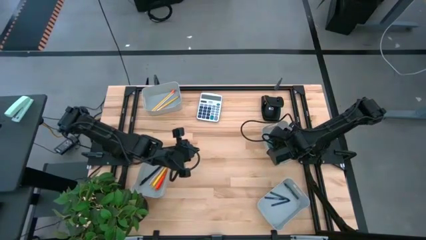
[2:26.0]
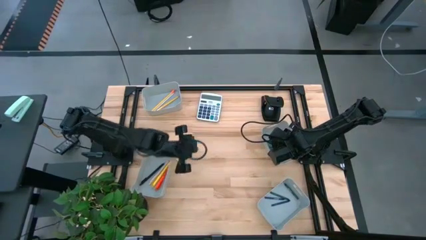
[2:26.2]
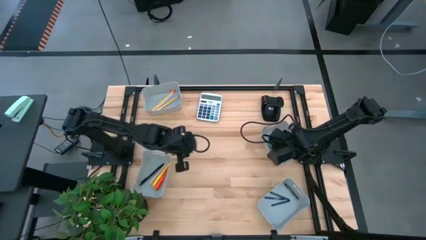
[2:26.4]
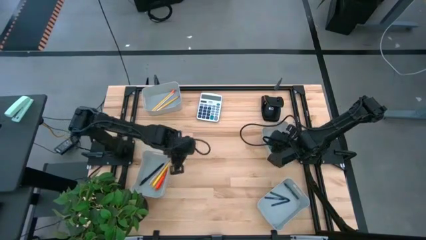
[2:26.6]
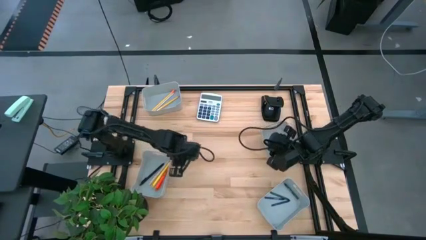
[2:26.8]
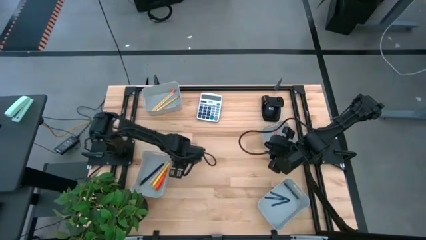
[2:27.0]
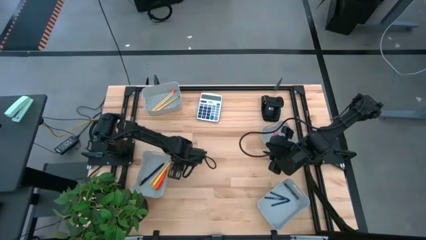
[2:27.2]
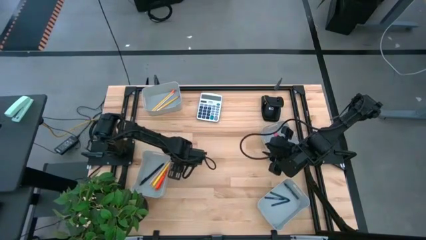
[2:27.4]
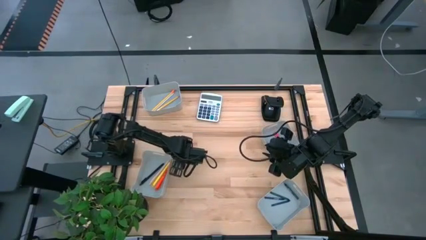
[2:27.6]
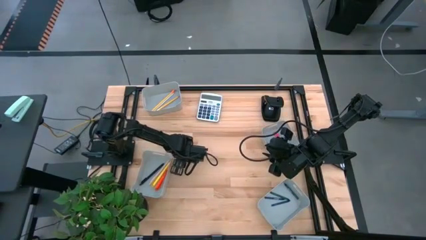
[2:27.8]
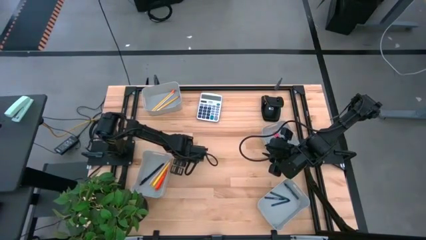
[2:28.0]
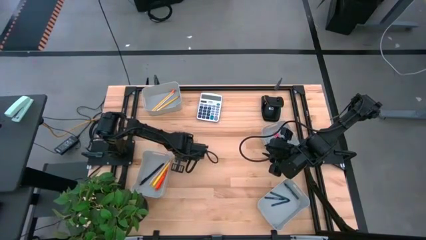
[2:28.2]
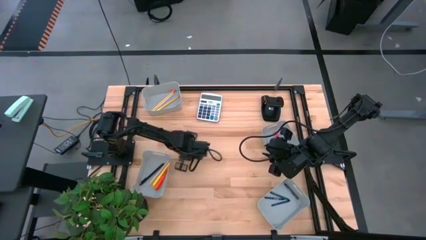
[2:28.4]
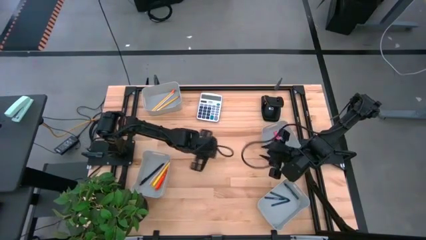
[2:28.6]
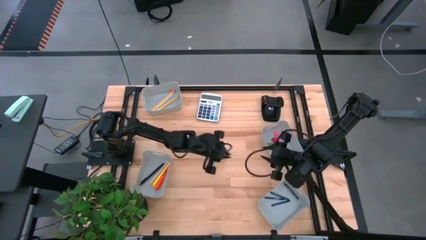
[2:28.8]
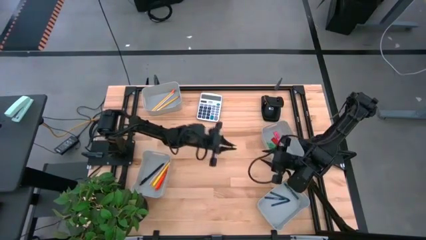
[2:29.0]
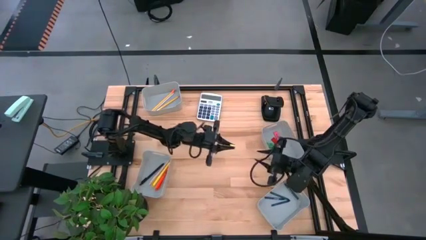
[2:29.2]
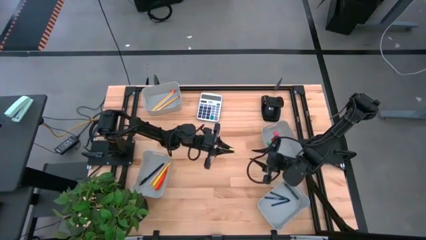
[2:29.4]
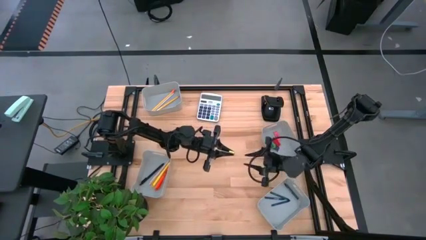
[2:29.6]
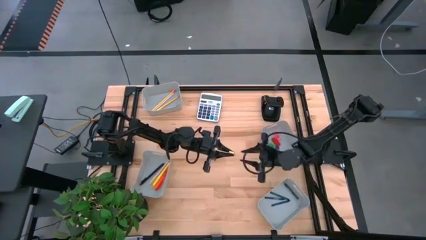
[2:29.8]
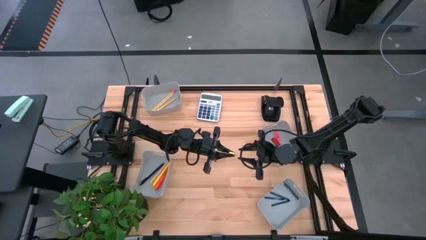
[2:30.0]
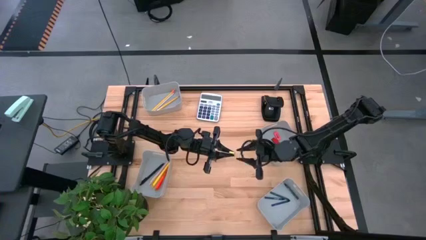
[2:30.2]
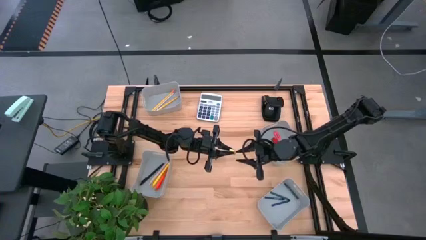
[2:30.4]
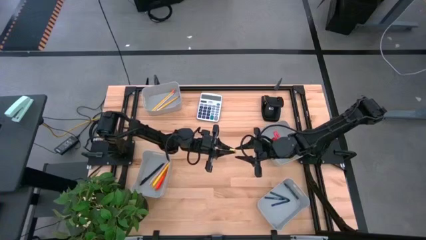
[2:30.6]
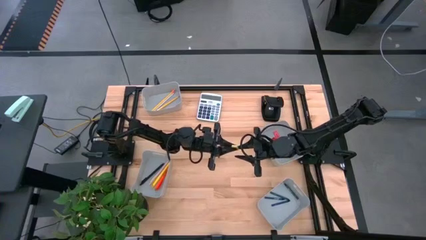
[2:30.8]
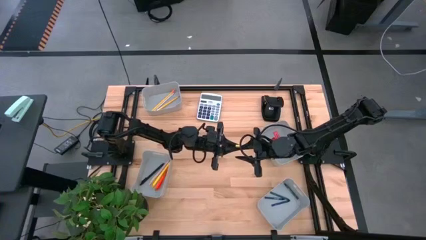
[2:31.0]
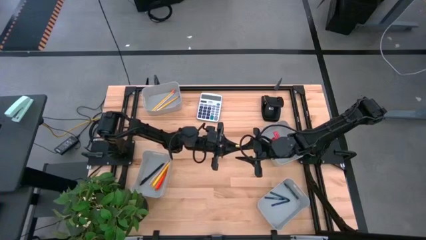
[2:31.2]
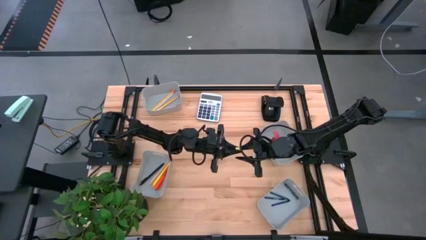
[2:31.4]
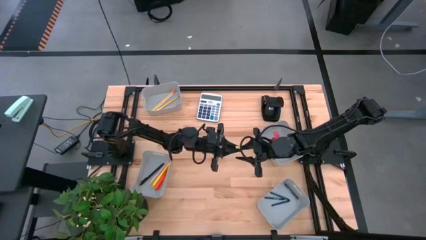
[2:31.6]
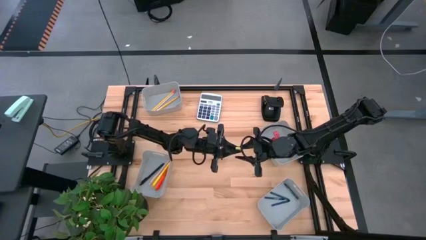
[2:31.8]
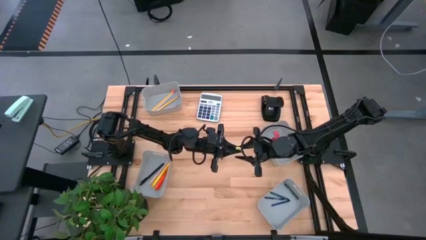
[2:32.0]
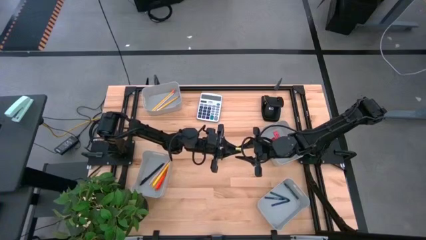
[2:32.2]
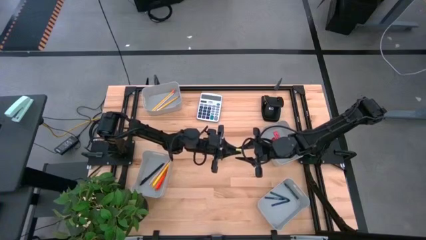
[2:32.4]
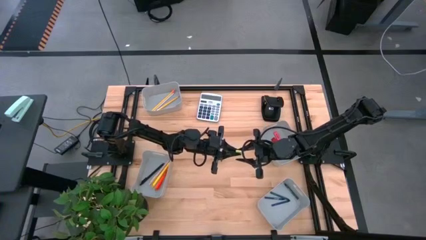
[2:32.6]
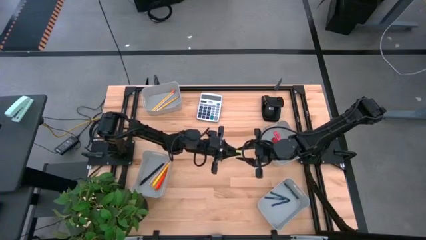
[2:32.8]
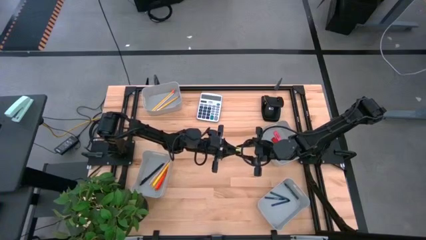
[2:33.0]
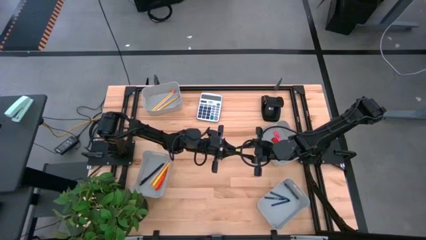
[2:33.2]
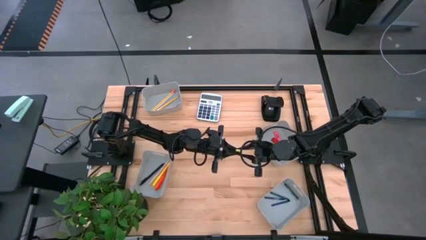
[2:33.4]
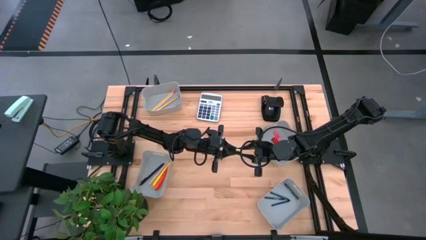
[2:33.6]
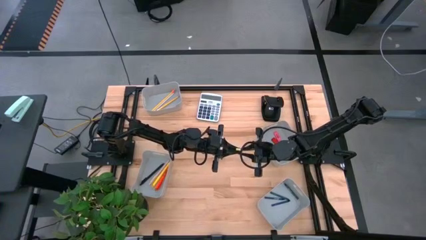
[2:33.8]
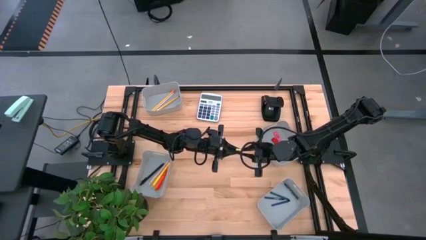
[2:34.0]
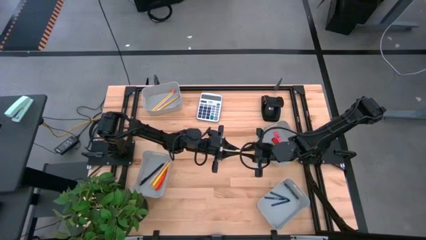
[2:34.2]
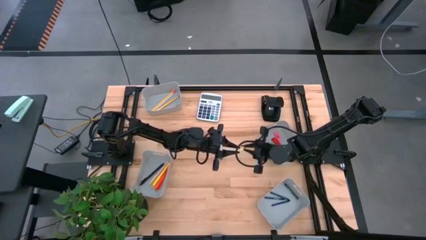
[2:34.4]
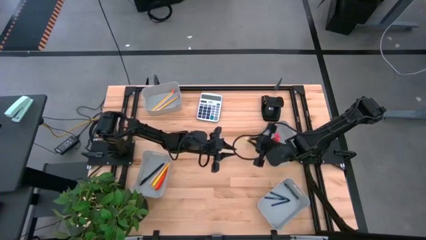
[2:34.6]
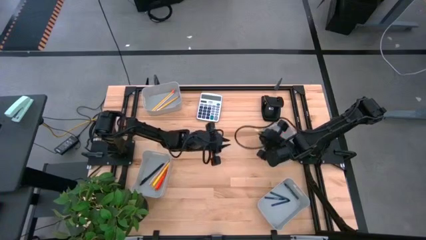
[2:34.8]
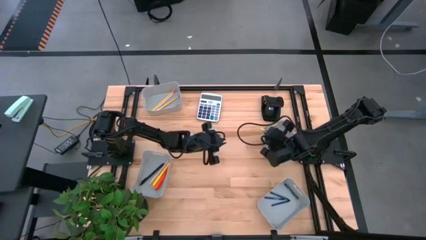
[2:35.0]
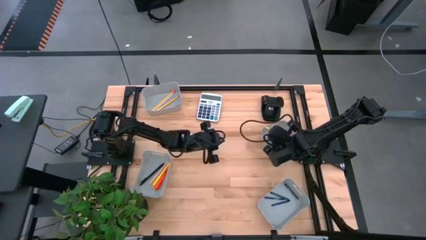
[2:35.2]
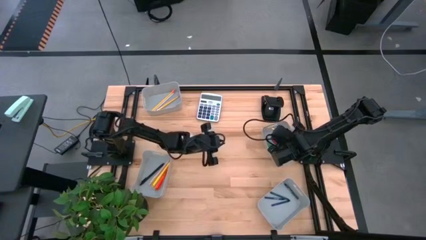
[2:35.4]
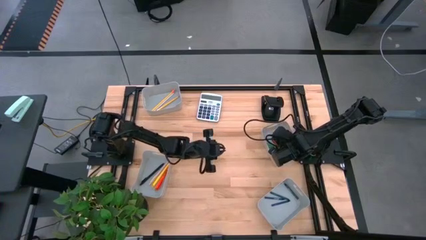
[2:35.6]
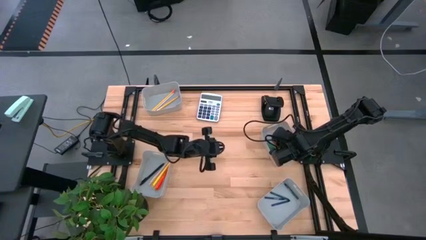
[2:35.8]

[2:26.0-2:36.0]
Task: Sort crayons/erasers/pens/pencils in bins
Put the light green eraser into the top left gray bin

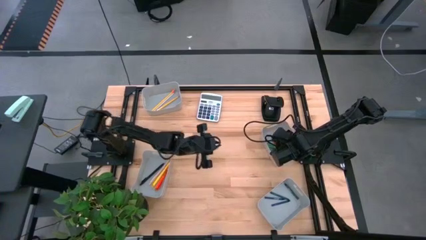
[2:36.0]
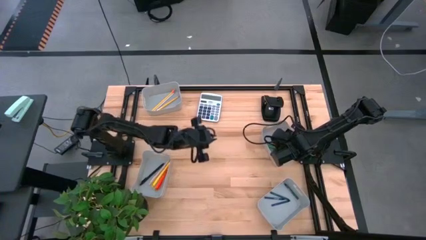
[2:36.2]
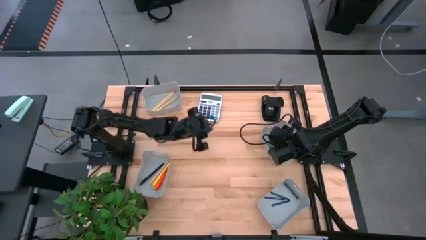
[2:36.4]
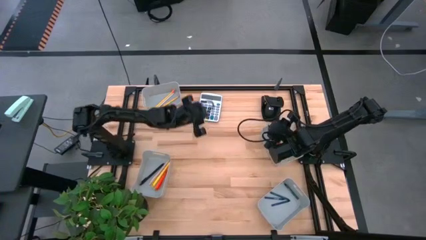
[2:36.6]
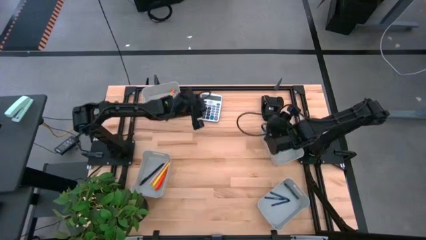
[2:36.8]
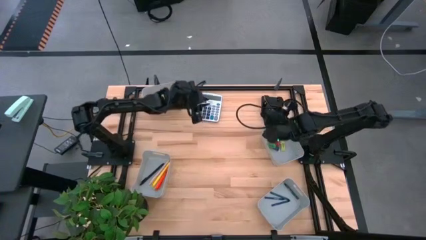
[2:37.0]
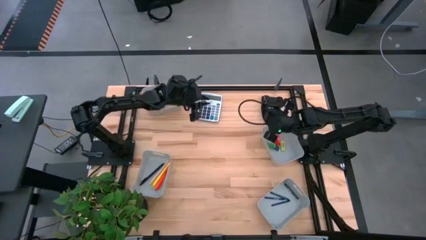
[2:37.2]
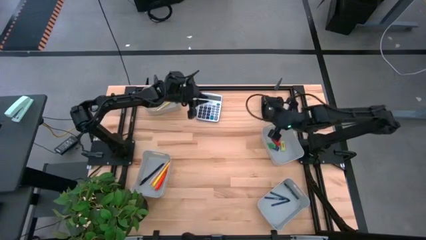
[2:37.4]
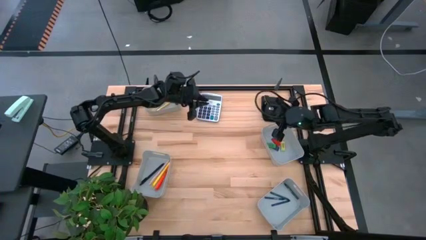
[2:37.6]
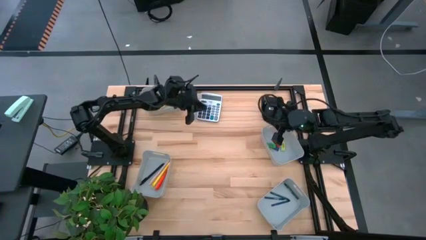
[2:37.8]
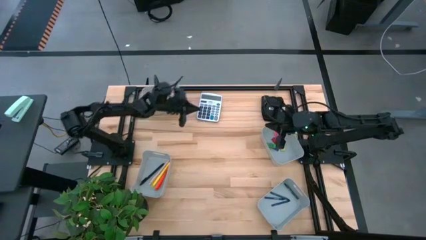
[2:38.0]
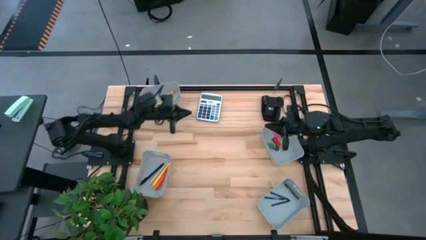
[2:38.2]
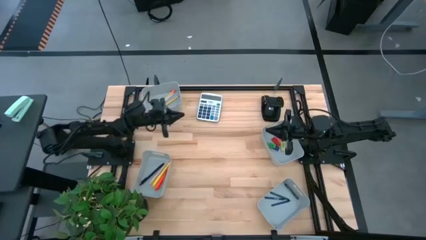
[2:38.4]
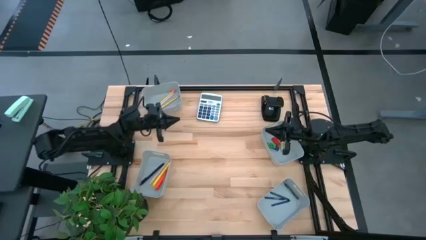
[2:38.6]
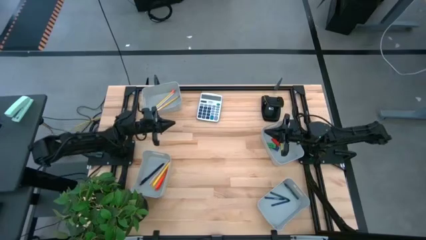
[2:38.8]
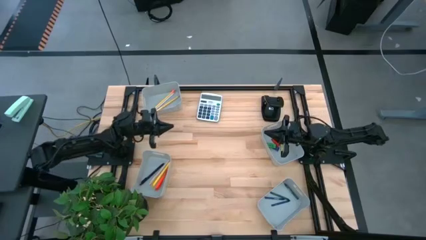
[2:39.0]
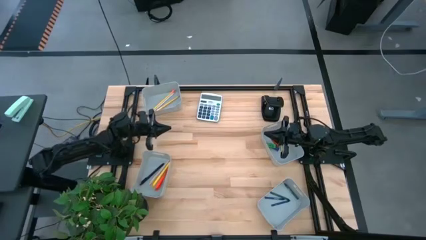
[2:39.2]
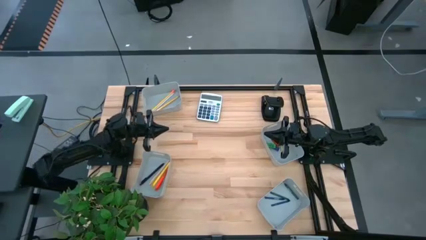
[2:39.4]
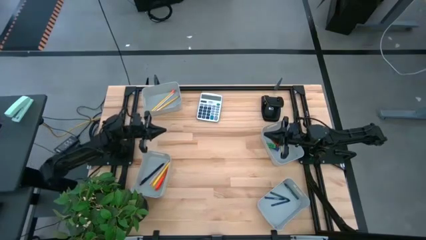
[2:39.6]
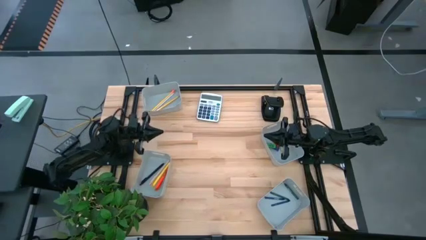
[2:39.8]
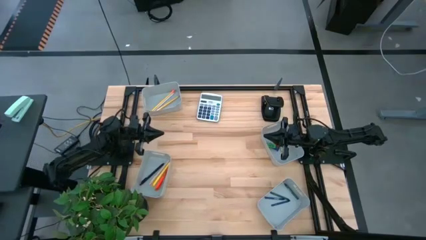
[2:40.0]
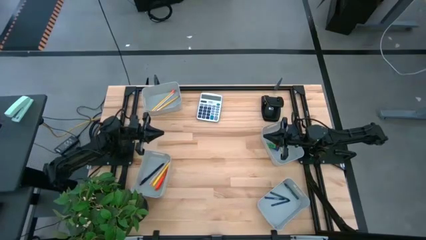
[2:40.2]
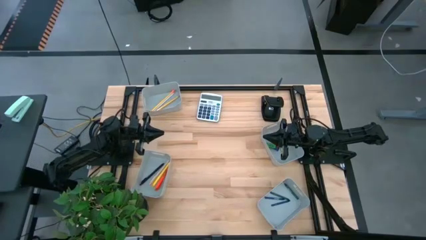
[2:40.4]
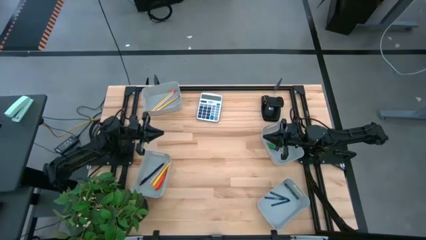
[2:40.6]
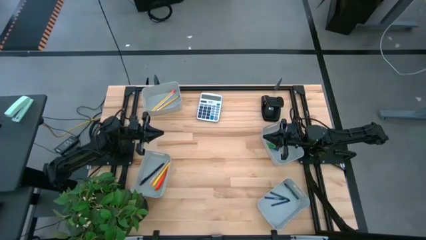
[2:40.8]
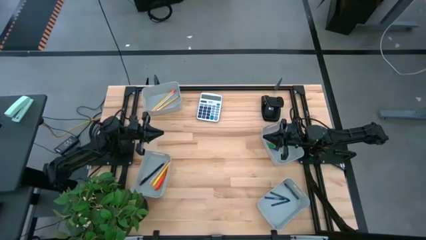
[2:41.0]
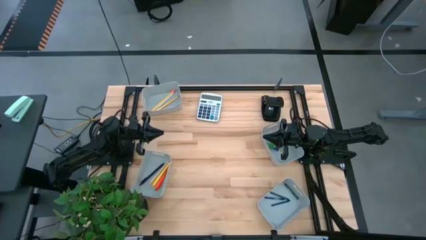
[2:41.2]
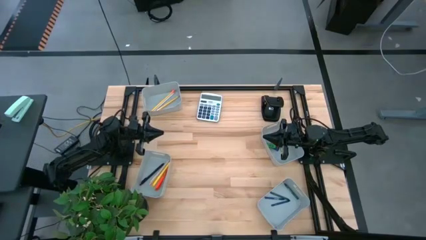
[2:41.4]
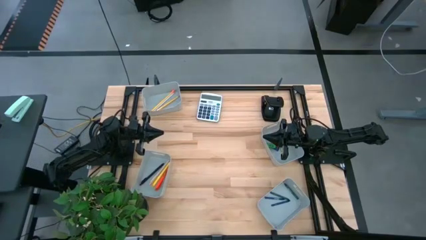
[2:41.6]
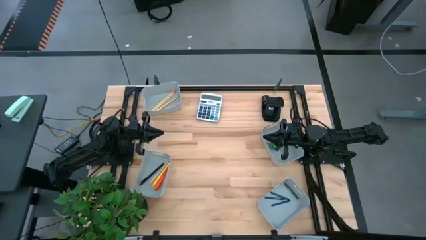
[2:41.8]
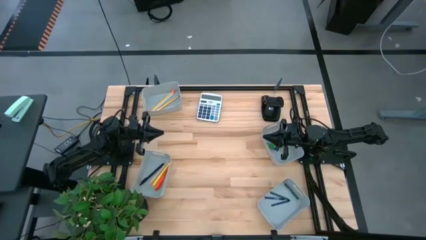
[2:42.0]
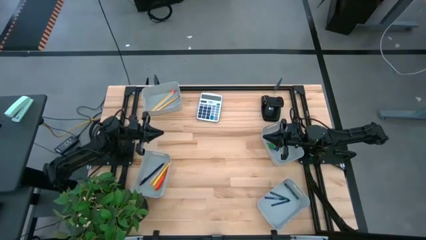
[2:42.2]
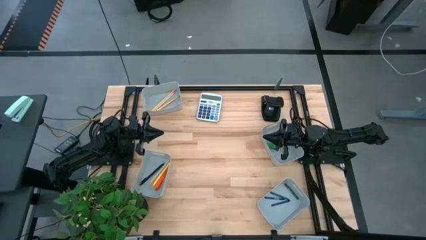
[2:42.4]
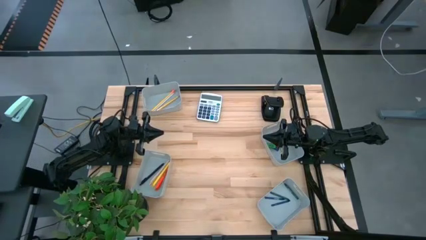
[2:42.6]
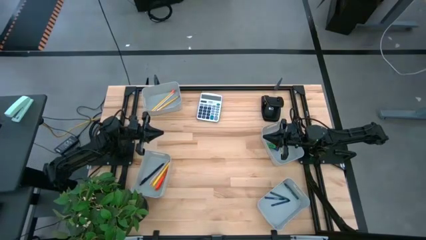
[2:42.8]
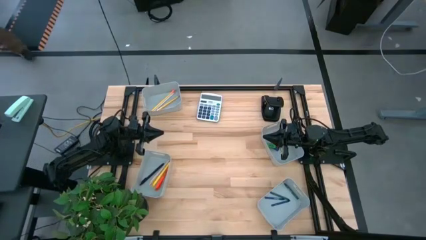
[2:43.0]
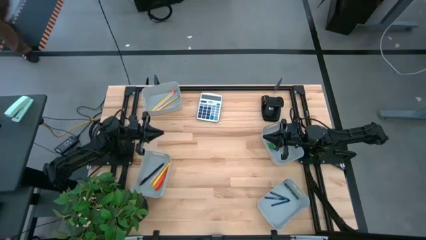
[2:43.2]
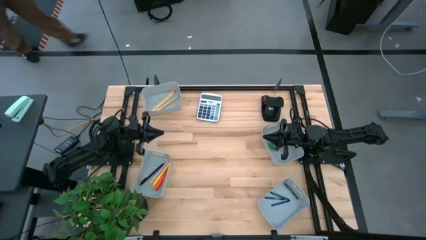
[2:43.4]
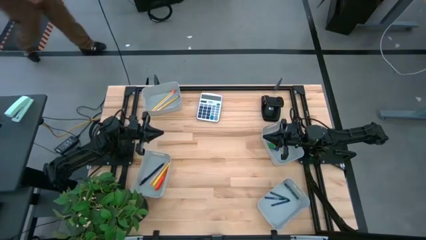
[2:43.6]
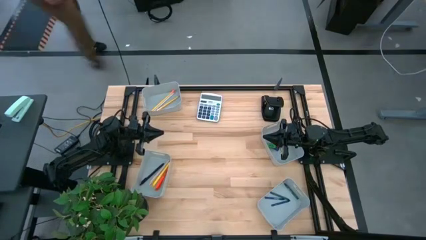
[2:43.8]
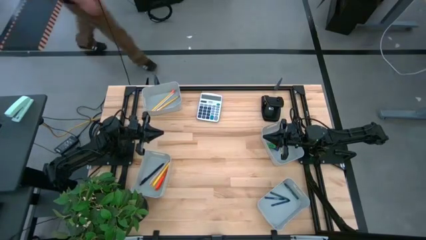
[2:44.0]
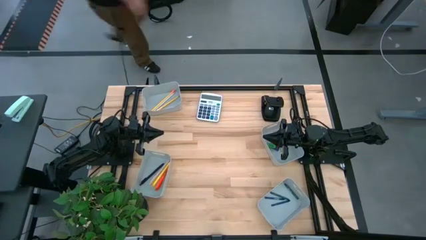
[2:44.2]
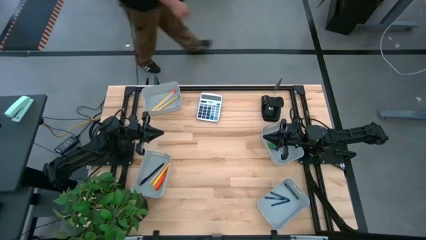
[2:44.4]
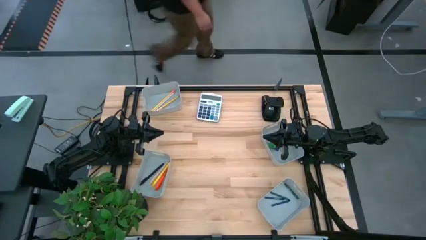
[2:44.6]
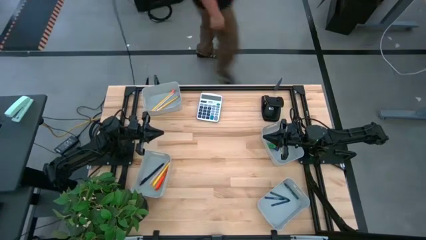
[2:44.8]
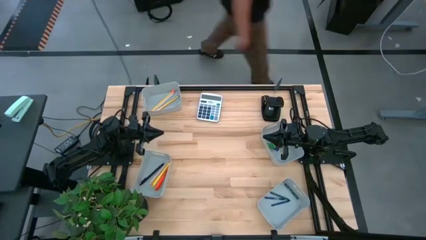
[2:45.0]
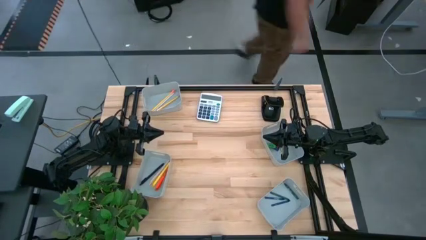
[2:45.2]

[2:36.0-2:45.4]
Return to Home Position
